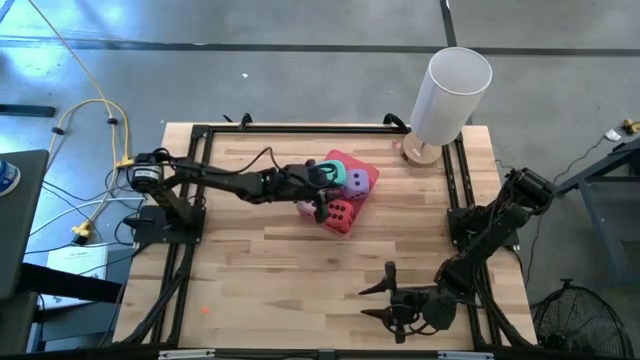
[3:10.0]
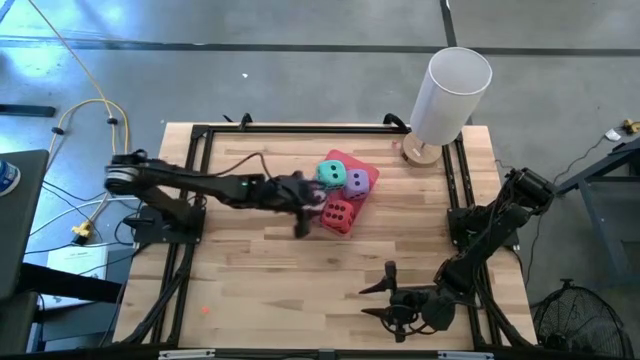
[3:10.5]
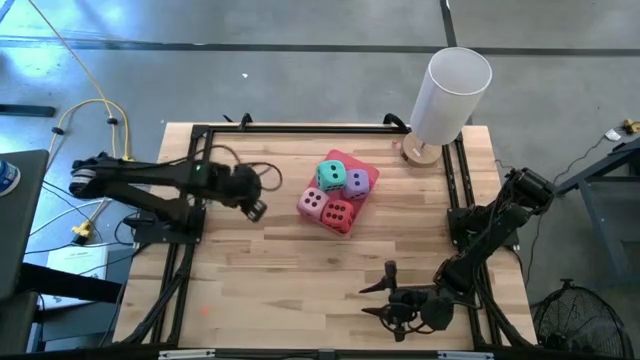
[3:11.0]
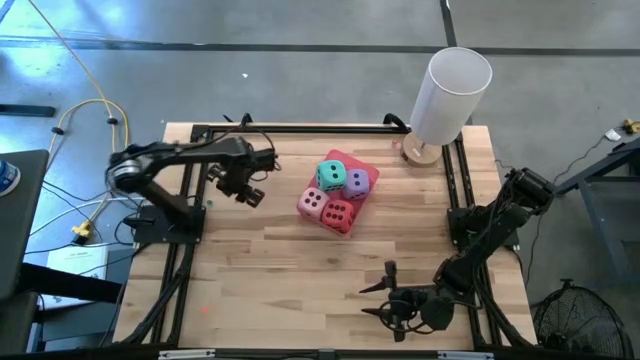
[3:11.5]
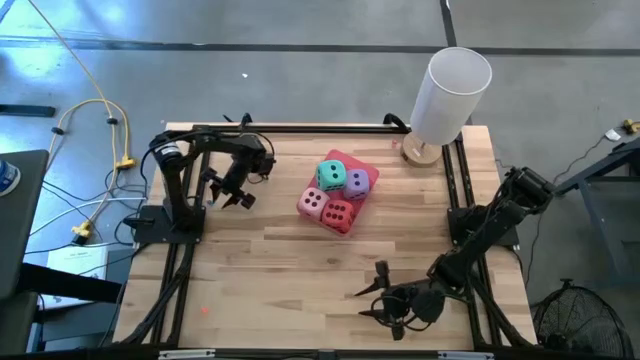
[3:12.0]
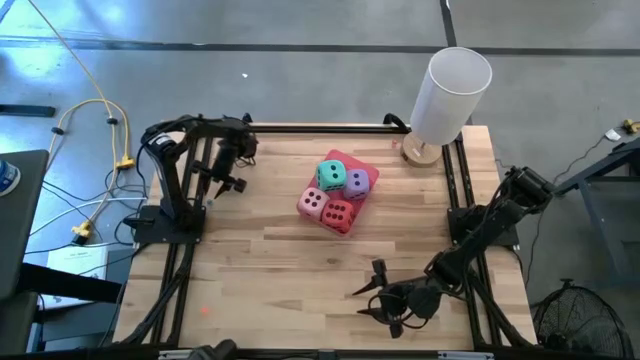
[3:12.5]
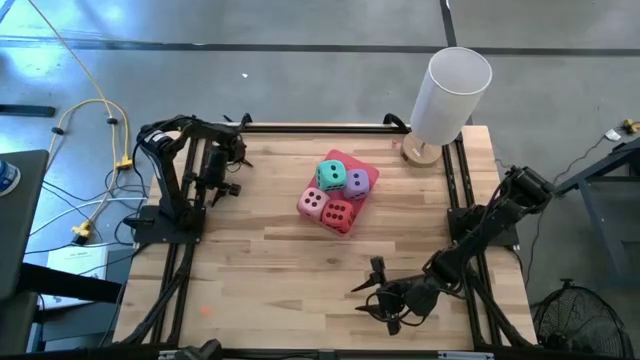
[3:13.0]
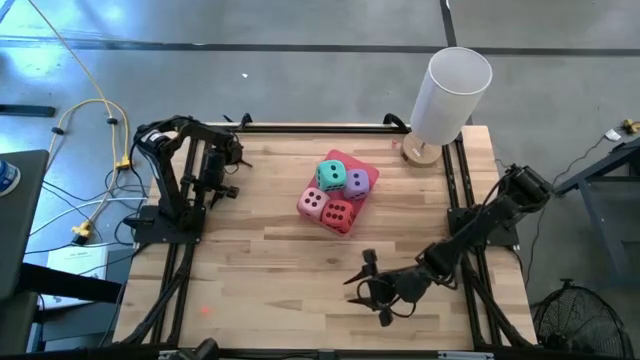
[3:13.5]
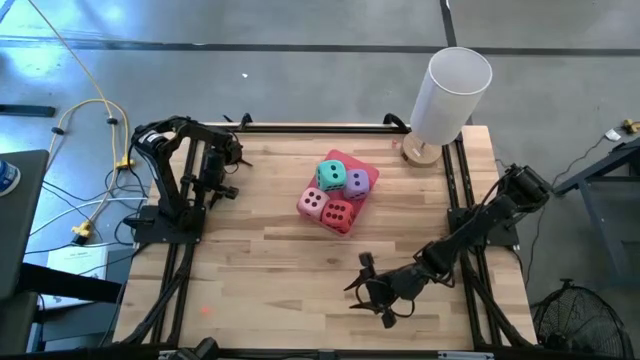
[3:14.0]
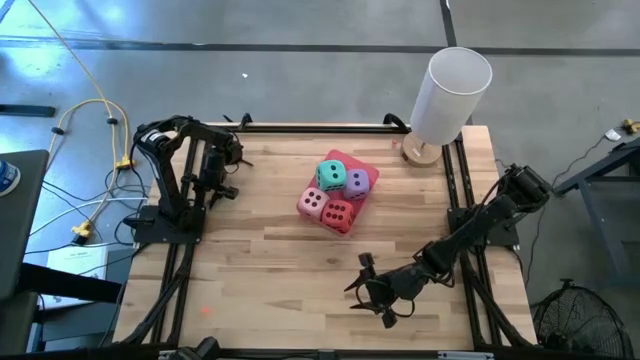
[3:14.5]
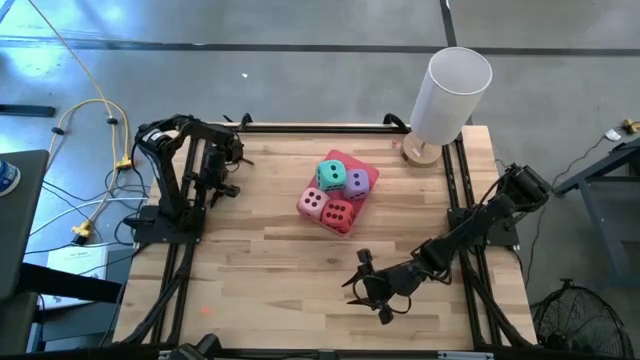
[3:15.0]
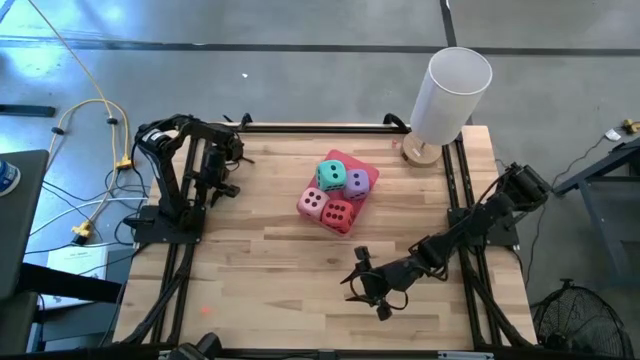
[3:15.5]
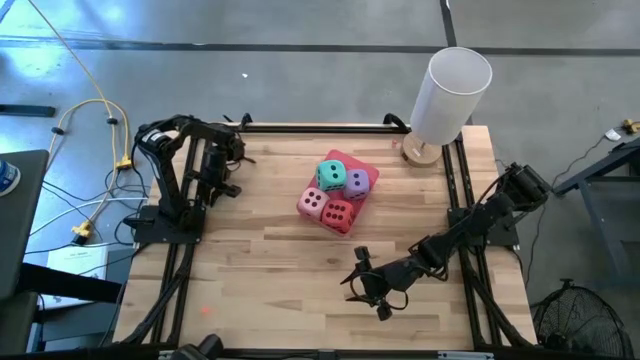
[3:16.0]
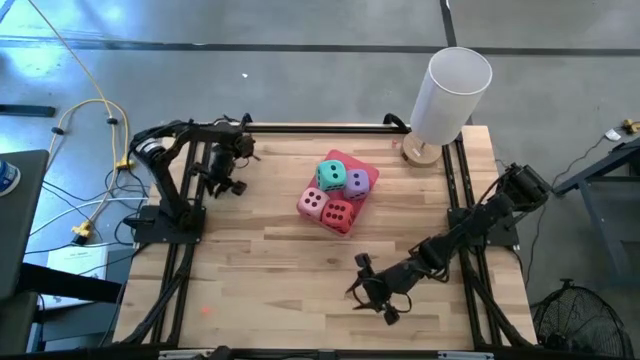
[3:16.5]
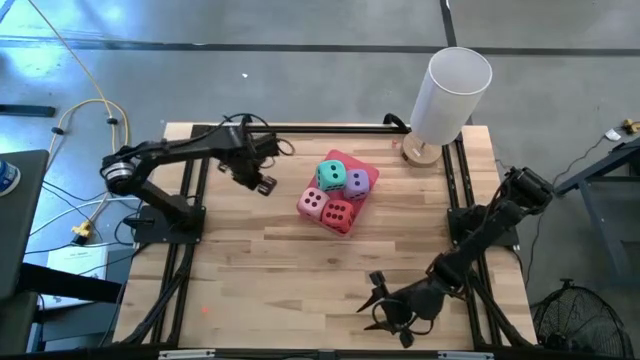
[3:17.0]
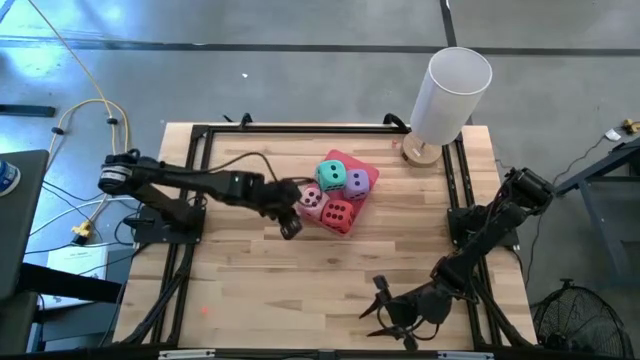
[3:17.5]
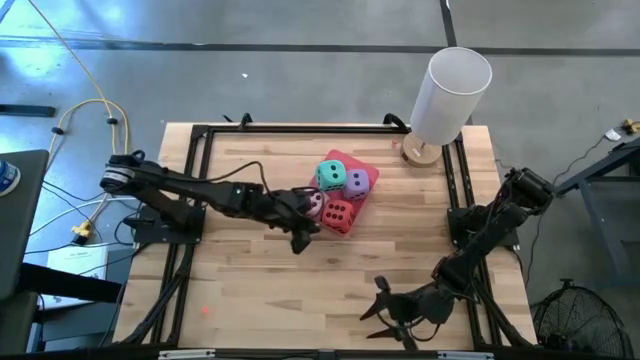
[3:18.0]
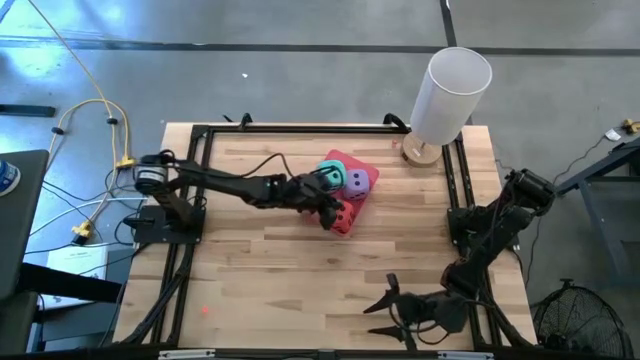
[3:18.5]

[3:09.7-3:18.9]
Task: Pick & Place Dice
Put the small light blue die into the red bin

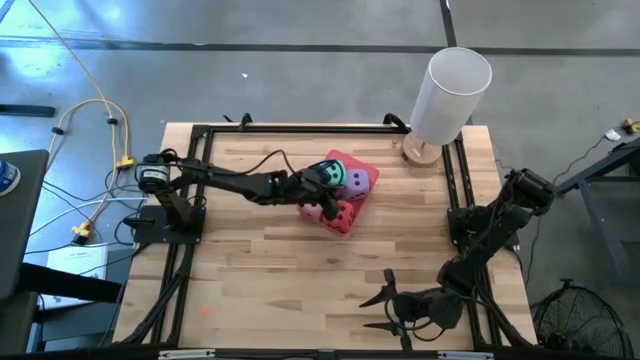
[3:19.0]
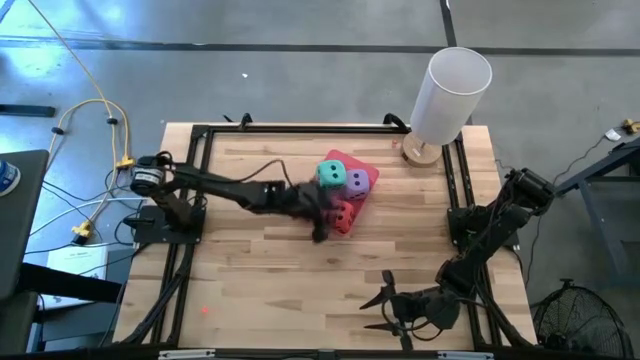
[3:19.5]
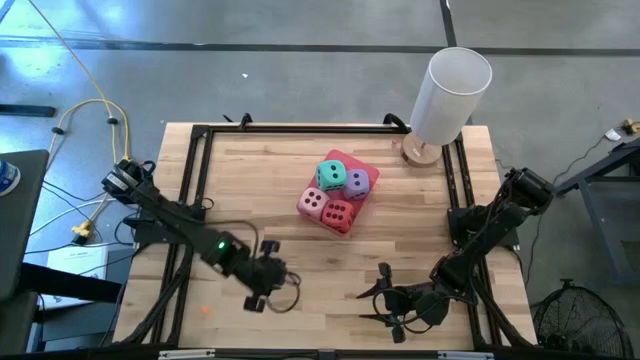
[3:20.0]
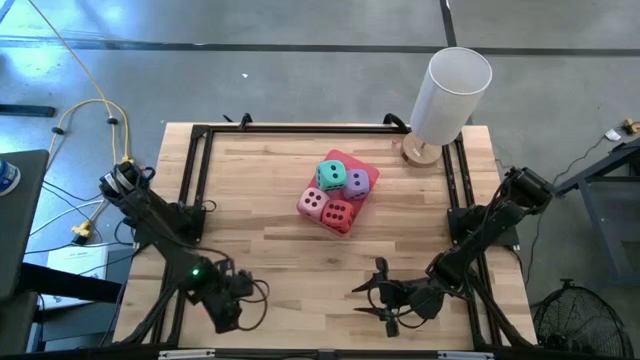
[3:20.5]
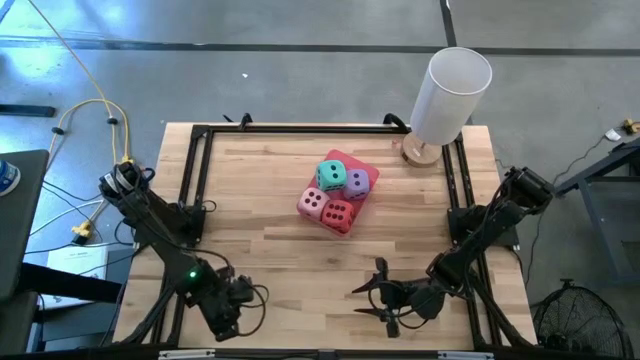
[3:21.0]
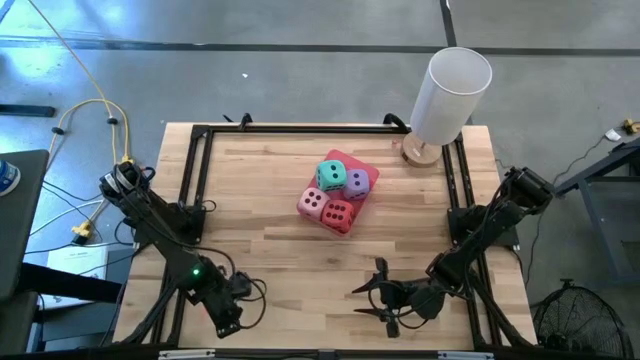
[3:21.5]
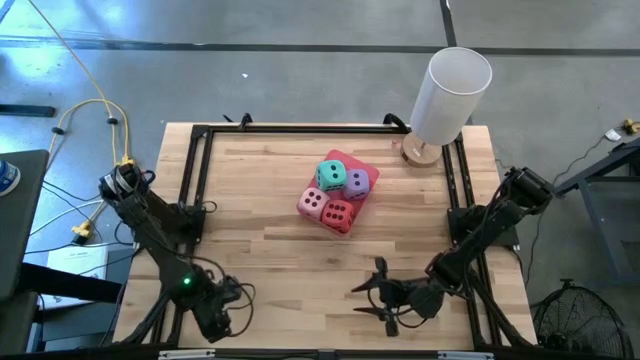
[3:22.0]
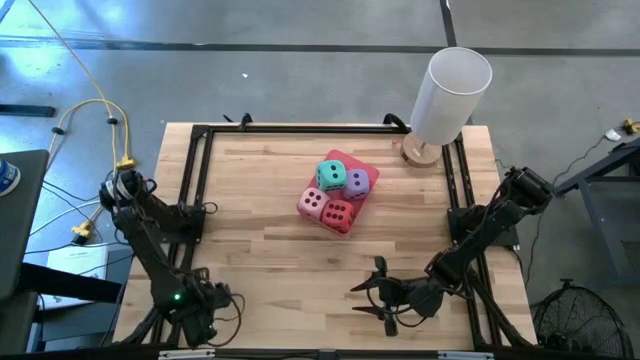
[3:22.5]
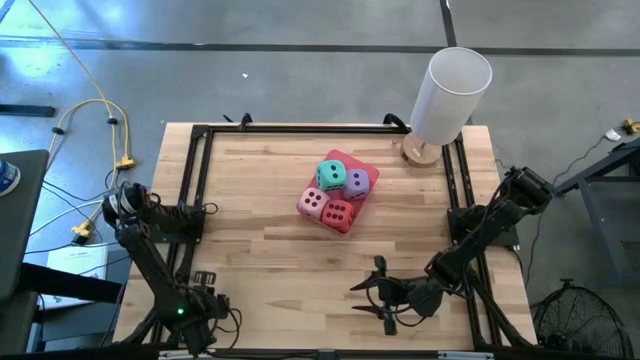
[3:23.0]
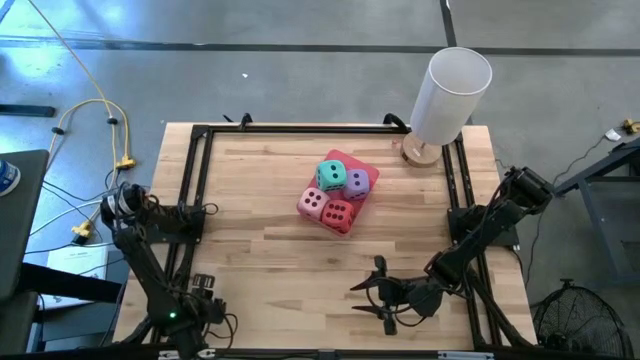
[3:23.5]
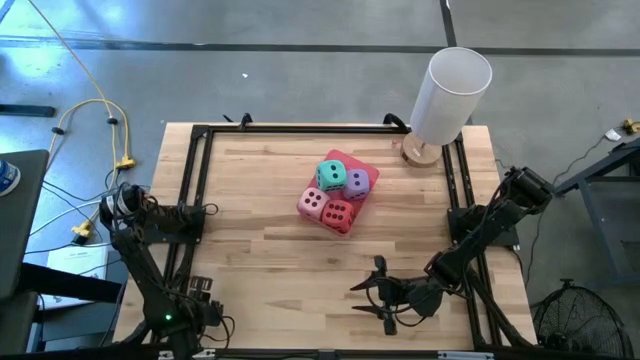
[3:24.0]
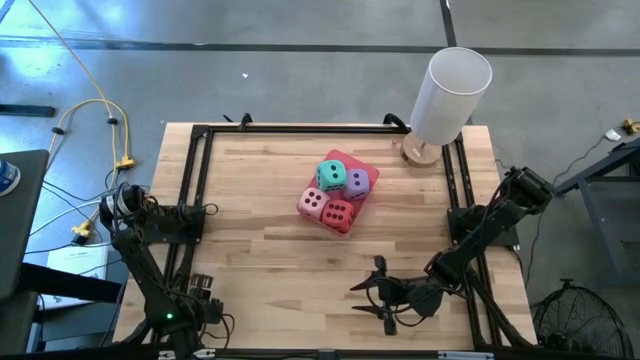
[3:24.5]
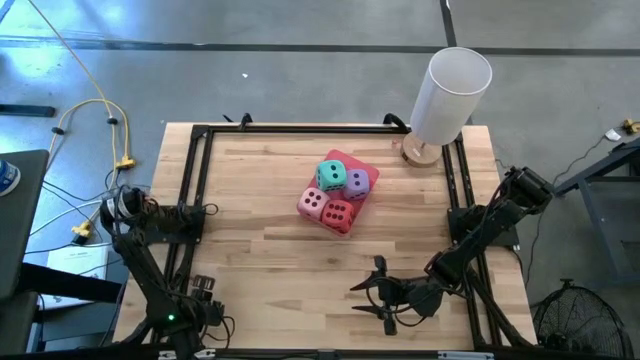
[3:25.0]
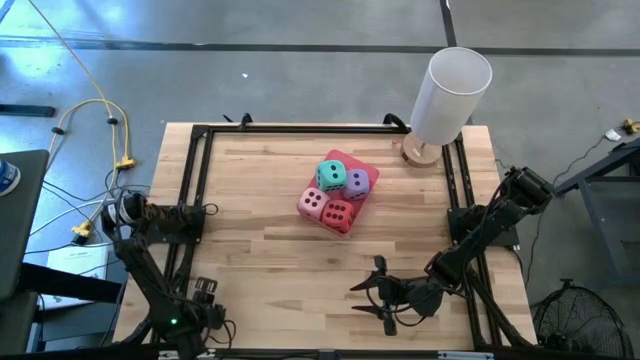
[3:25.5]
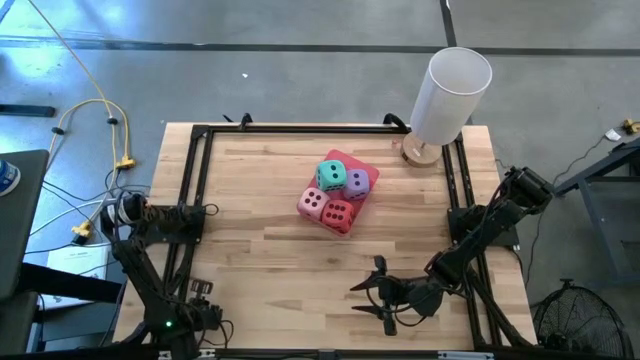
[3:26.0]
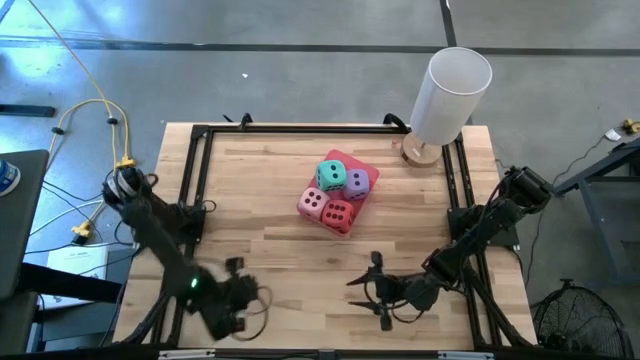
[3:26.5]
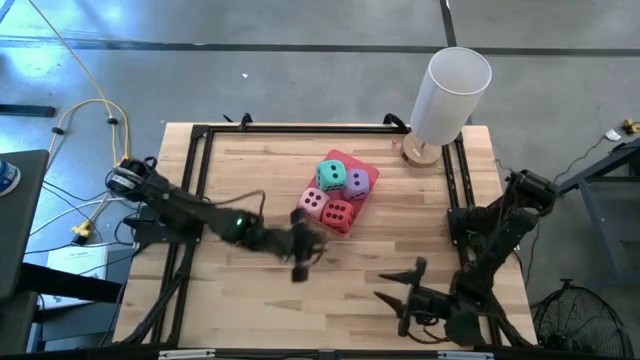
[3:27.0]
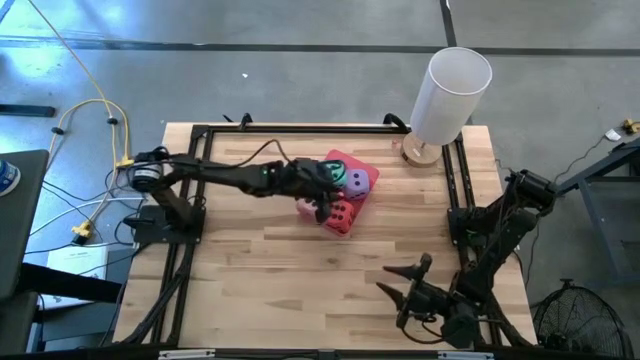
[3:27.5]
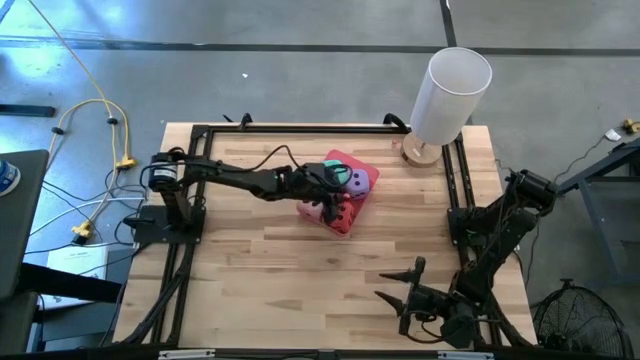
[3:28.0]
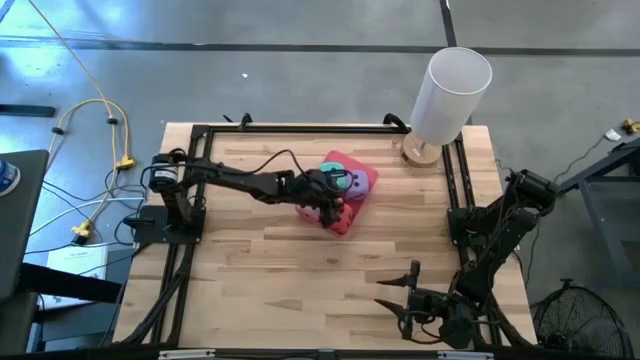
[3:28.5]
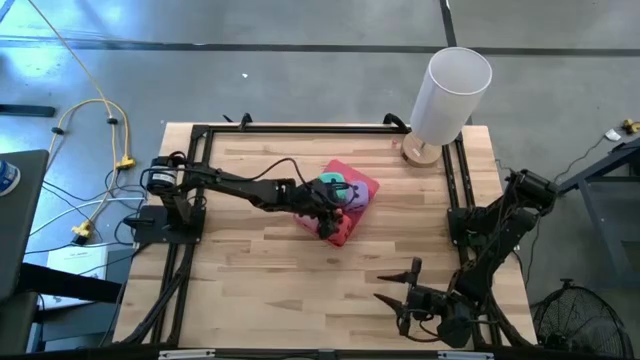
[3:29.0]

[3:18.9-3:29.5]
Put the small orange die into the red bin
